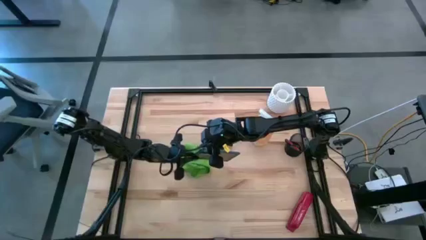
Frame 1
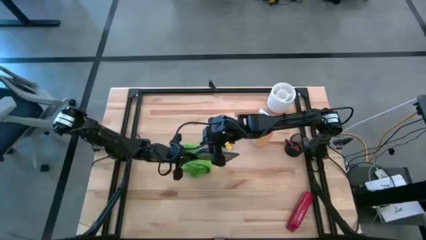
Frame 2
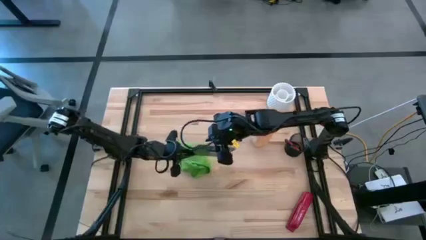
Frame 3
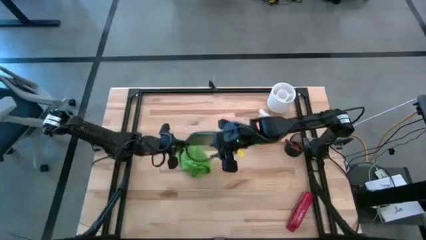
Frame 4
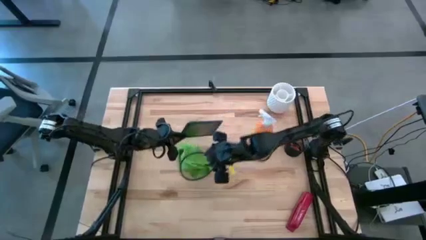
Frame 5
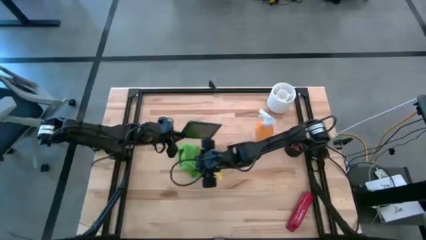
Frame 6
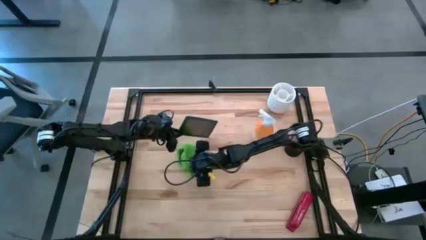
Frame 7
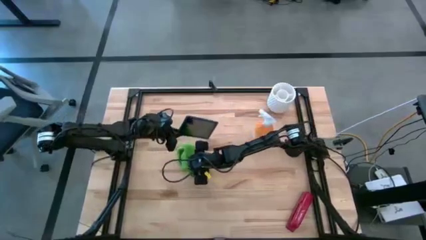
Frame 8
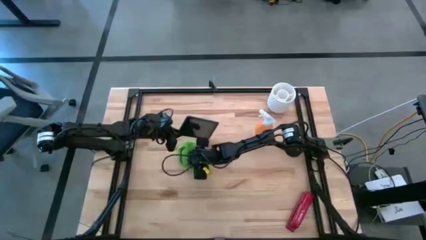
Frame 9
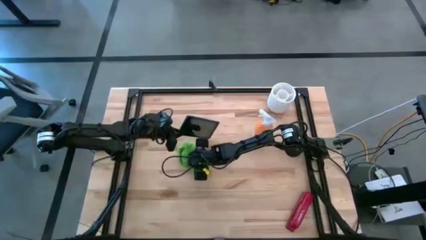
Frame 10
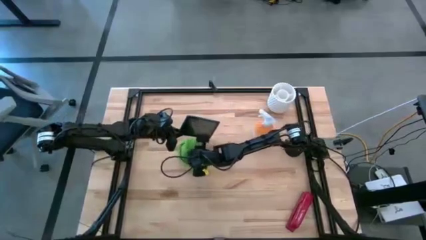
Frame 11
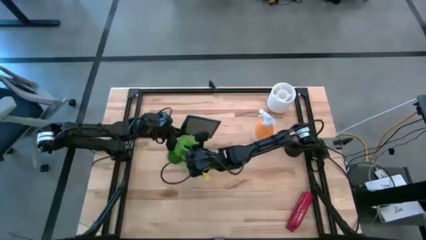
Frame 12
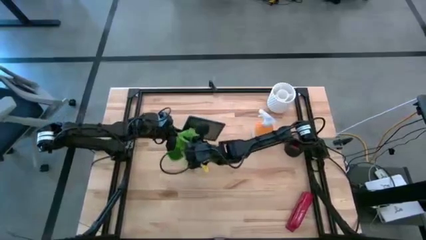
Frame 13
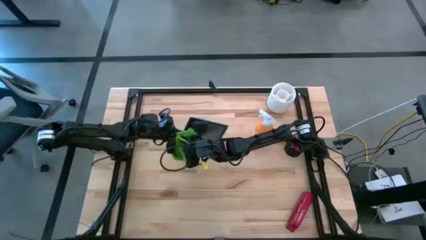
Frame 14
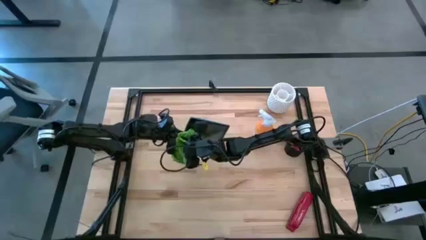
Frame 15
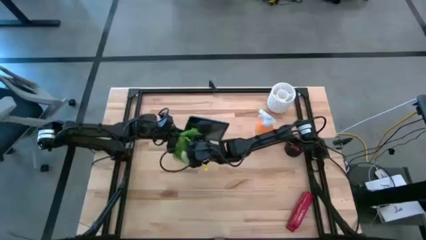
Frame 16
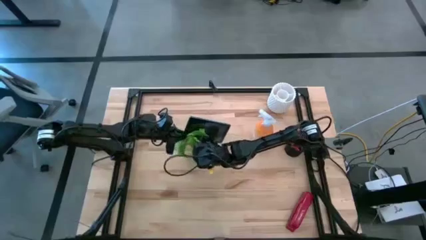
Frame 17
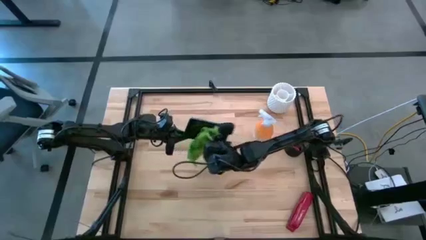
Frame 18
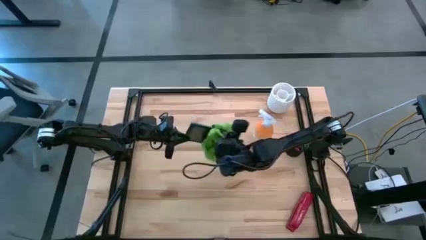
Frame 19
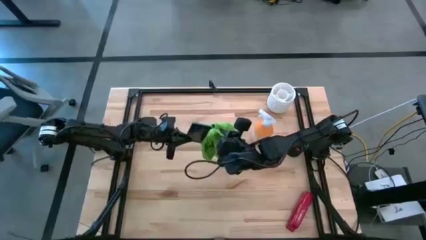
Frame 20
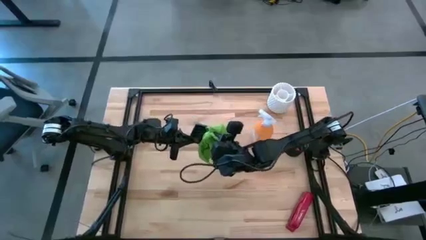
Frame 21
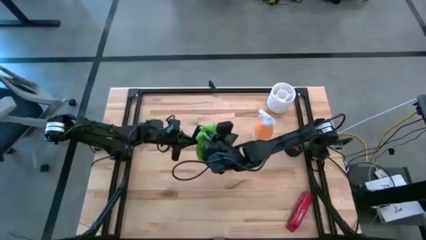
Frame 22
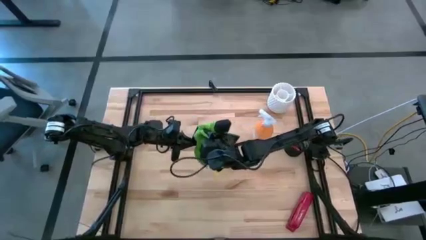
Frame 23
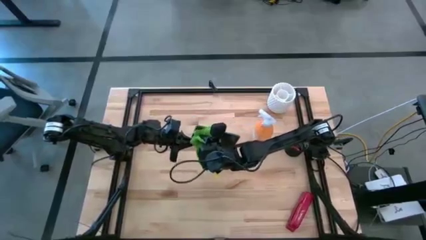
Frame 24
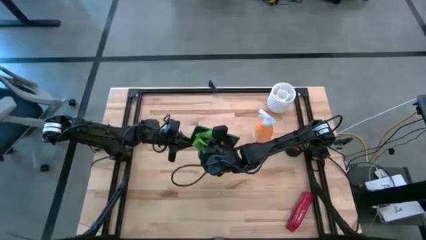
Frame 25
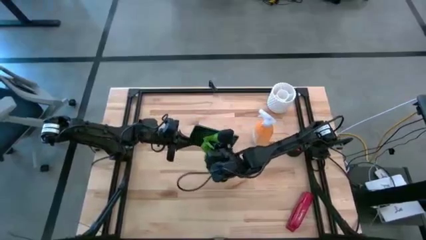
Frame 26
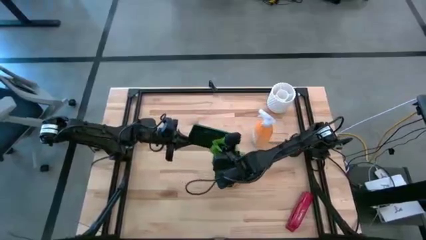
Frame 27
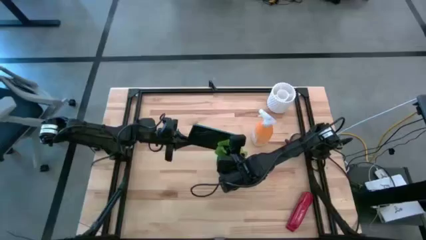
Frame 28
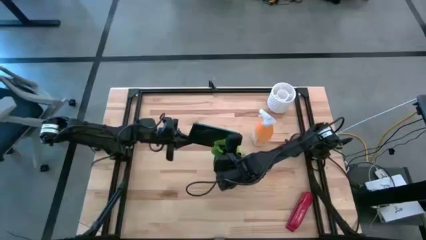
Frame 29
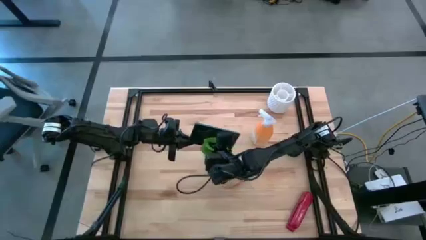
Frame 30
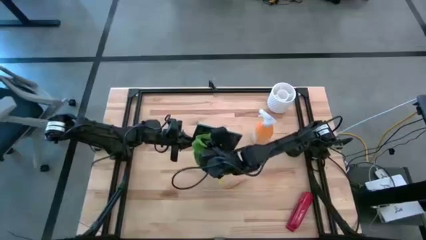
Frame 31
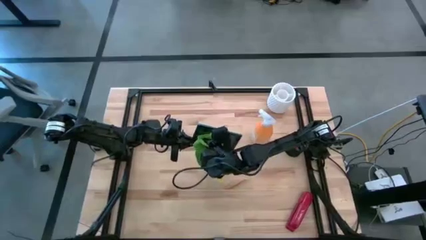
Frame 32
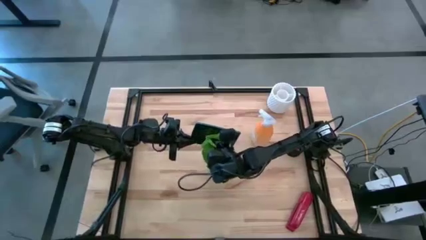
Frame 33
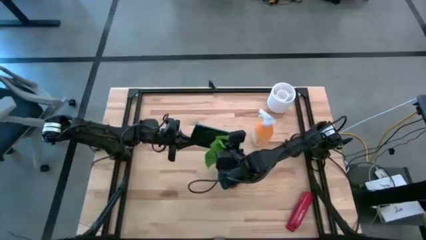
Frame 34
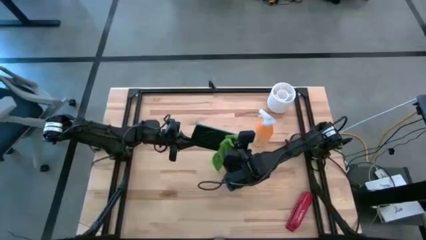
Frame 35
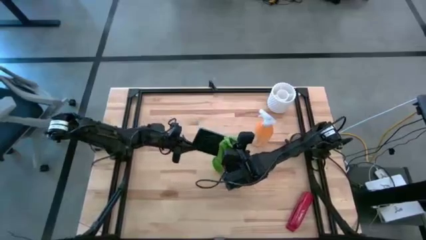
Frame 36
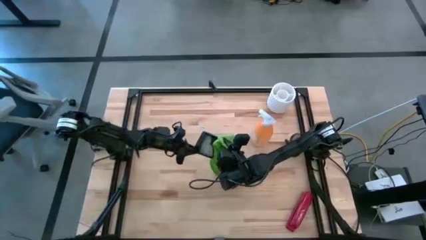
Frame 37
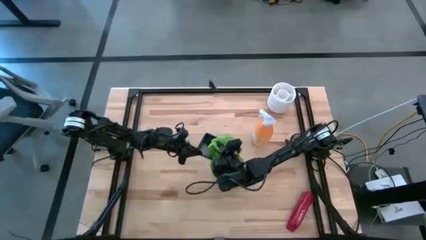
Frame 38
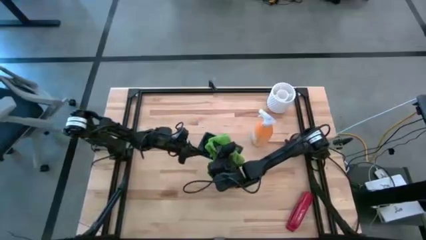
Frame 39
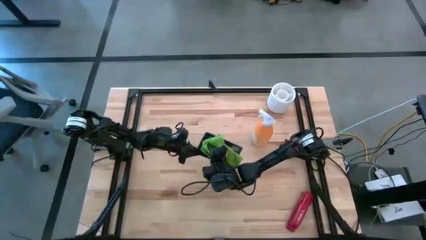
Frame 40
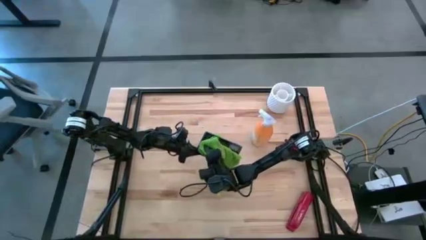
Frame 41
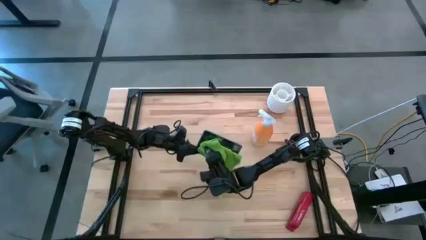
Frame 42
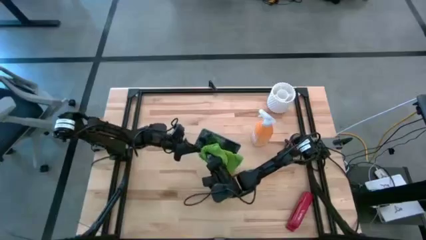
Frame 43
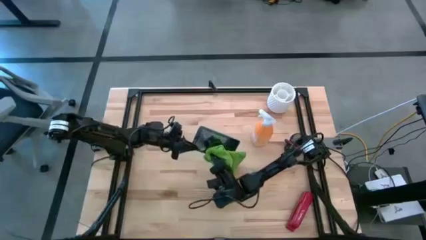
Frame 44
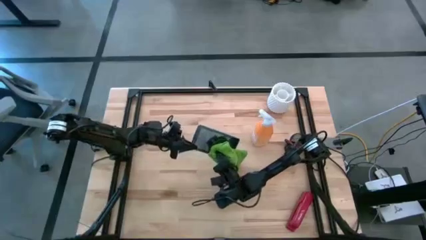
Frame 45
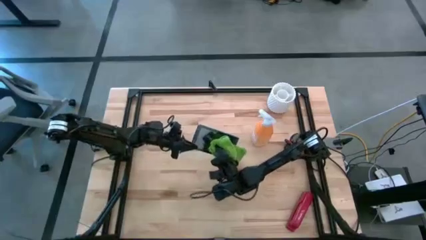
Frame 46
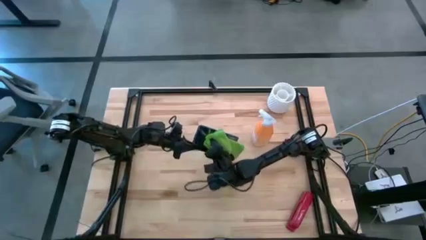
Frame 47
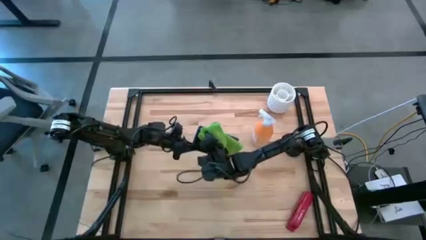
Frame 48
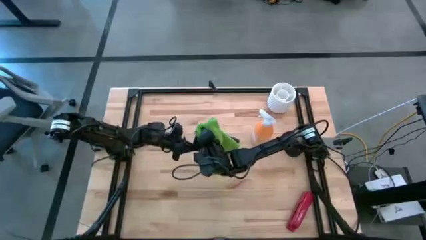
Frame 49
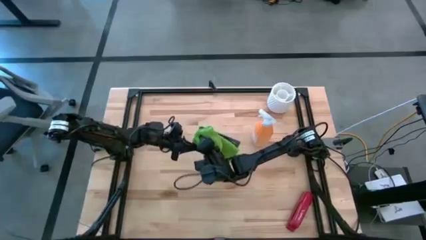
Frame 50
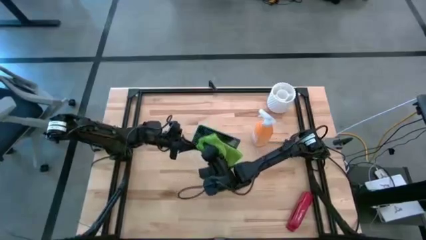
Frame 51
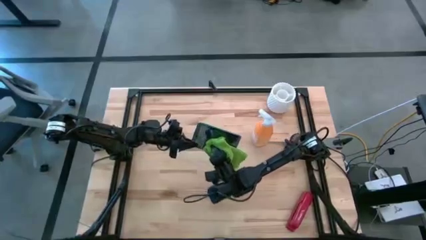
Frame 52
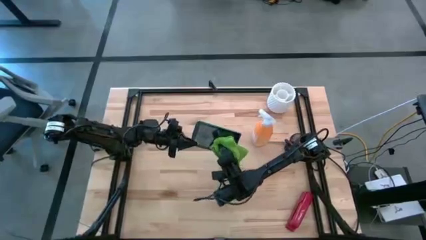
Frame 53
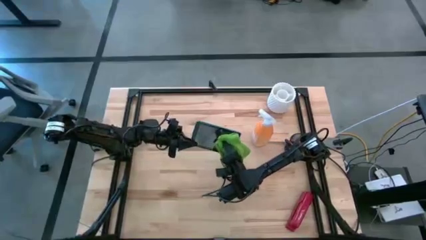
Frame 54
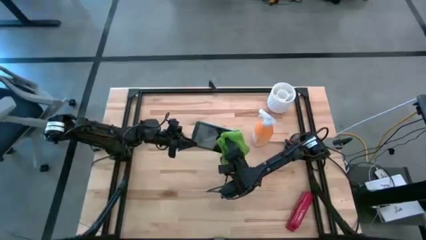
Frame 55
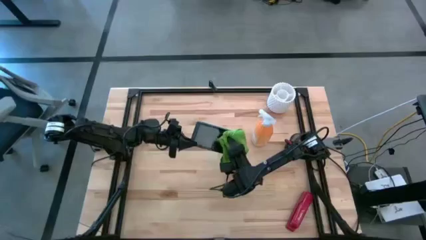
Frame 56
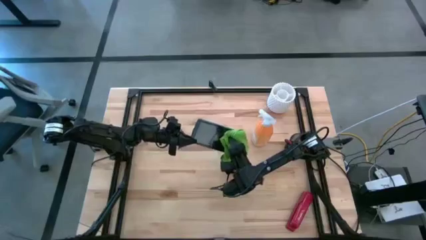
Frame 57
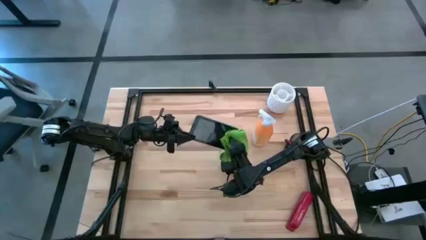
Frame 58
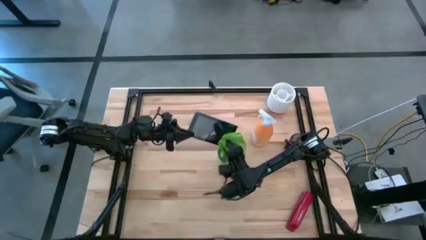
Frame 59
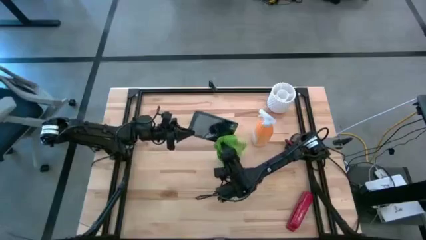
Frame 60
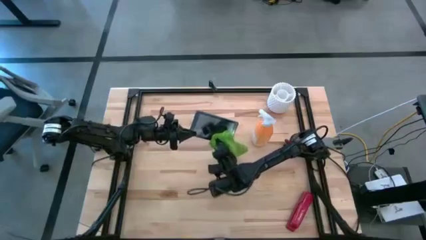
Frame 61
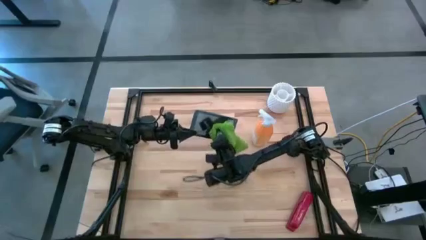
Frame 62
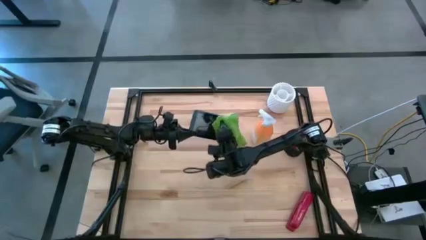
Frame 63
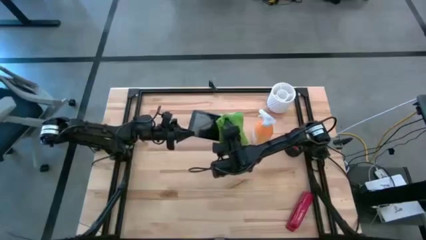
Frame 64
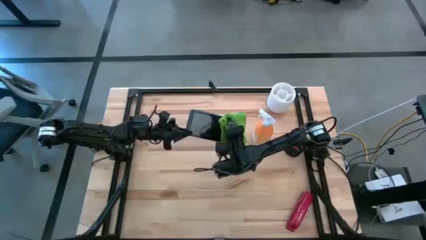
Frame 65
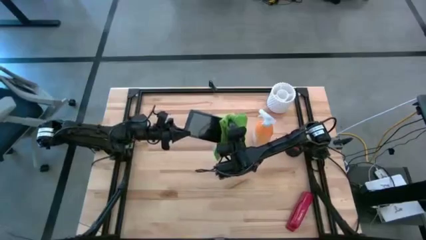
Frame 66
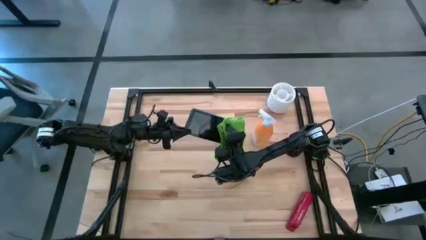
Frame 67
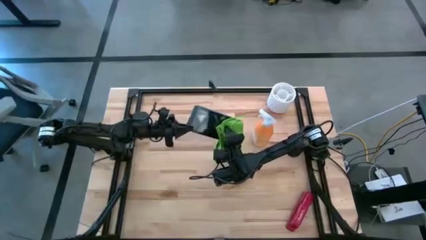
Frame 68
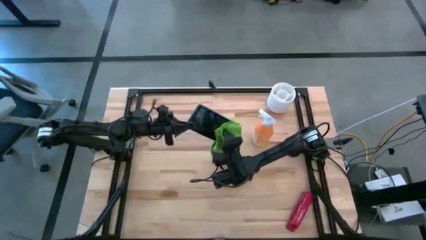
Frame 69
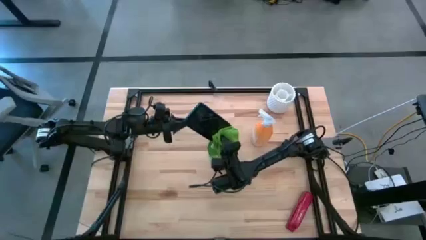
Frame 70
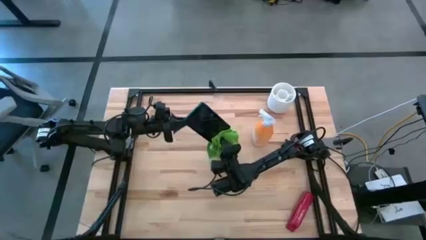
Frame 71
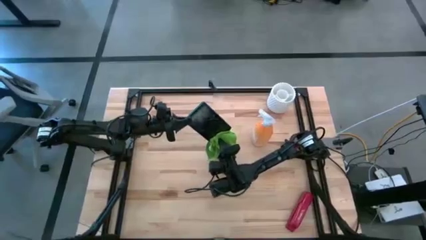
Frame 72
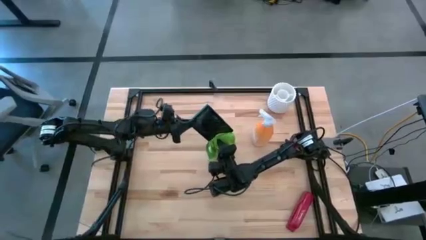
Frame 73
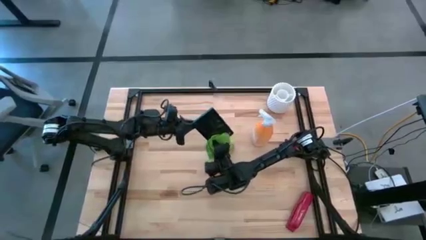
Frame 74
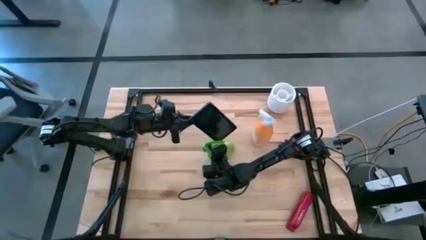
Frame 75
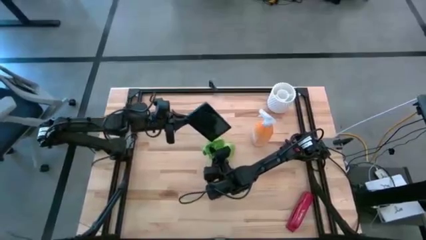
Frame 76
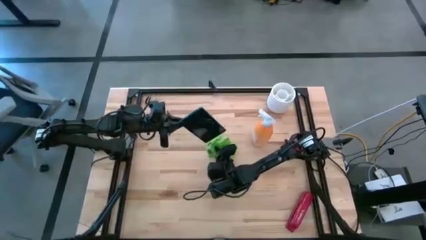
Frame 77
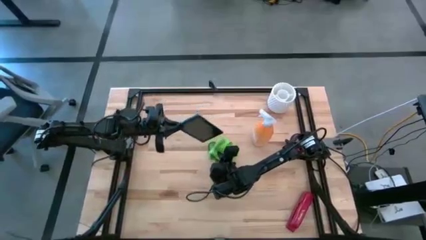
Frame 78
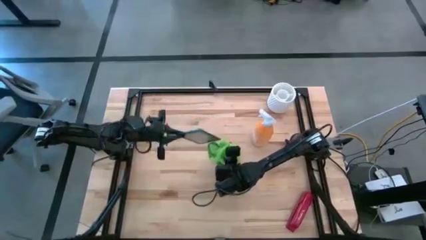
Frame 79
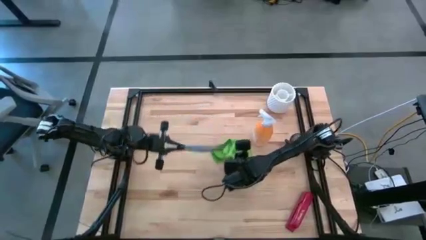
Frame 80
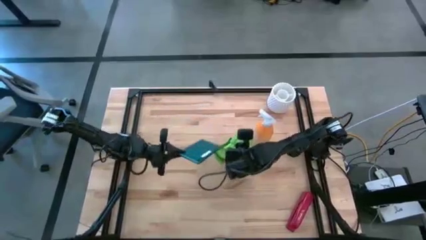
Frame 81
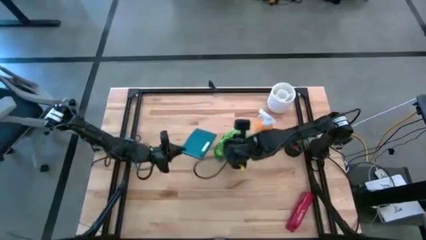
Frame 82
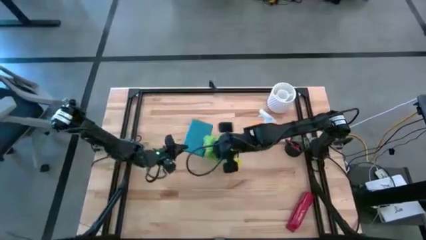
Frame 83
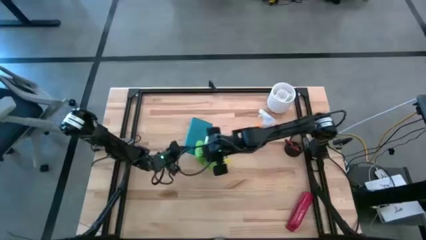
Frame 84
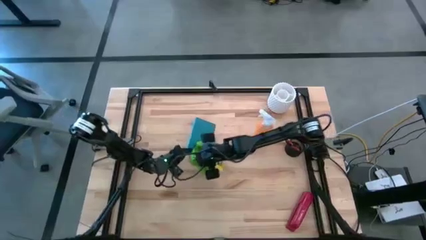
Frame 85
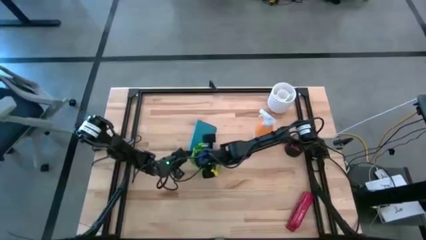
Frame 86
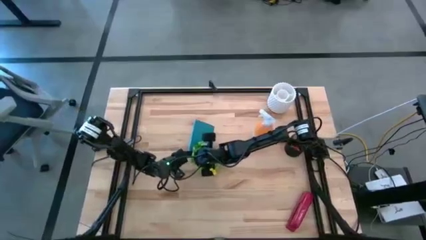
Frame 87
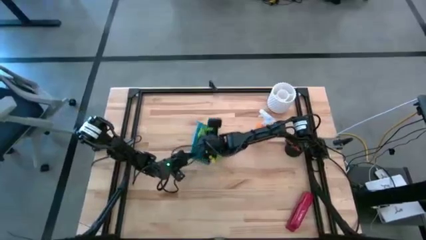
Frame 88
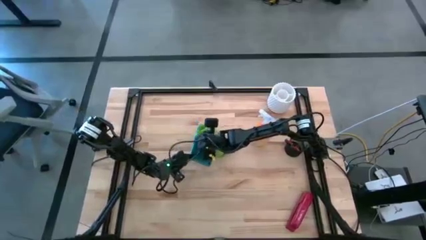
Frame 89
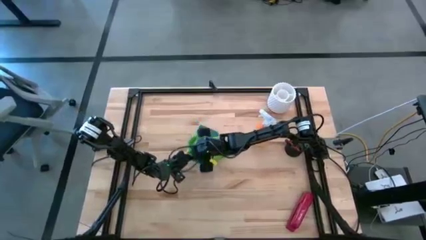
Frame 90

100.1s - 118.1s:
Task: Apply microfiber cloth
Wipe the back and front of the tablet with the green microfiber cloth
